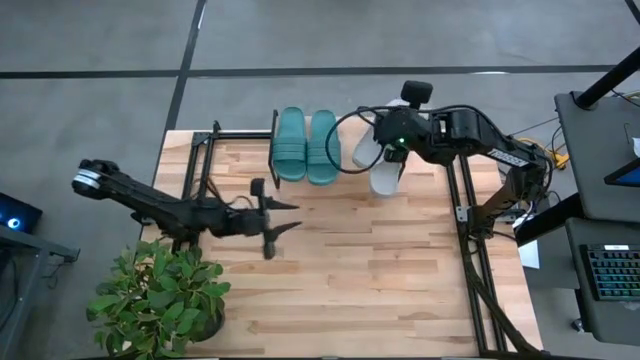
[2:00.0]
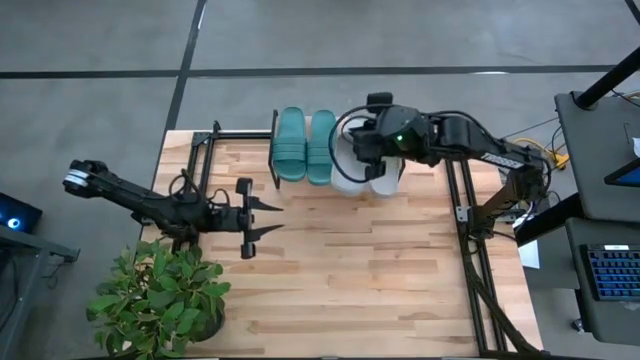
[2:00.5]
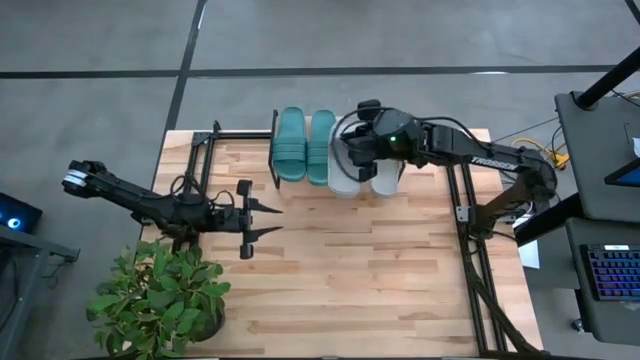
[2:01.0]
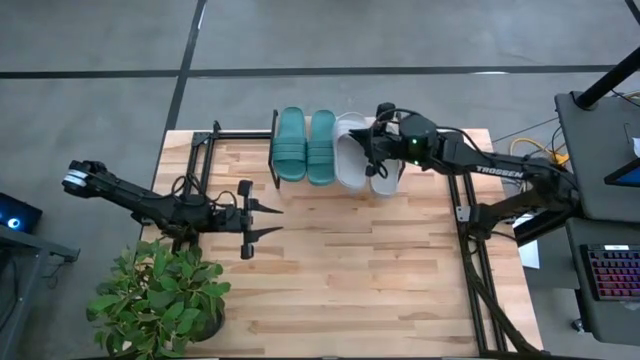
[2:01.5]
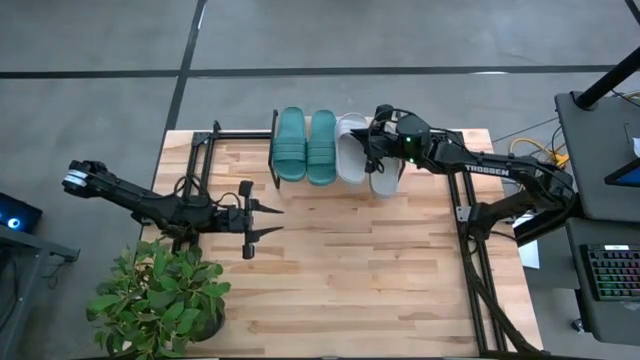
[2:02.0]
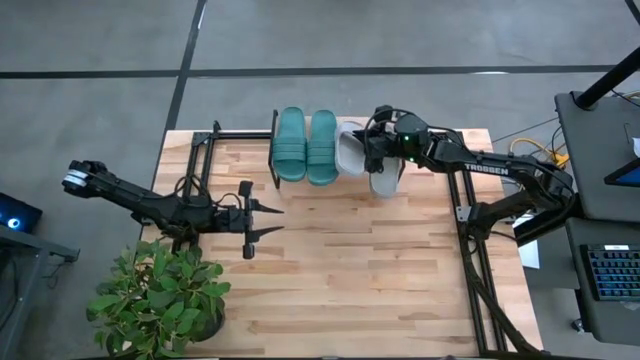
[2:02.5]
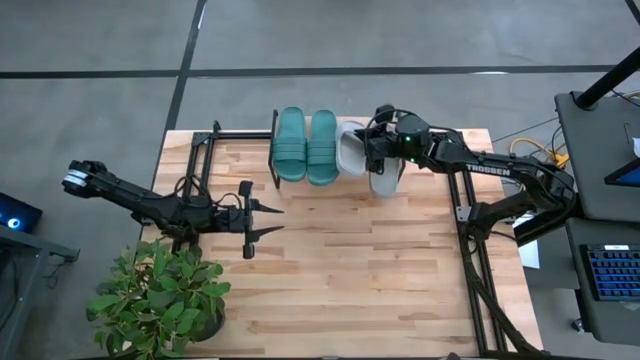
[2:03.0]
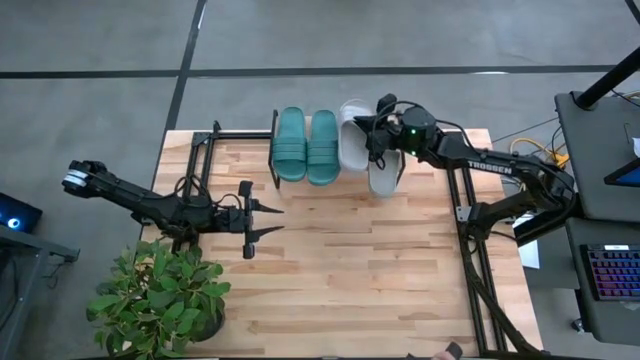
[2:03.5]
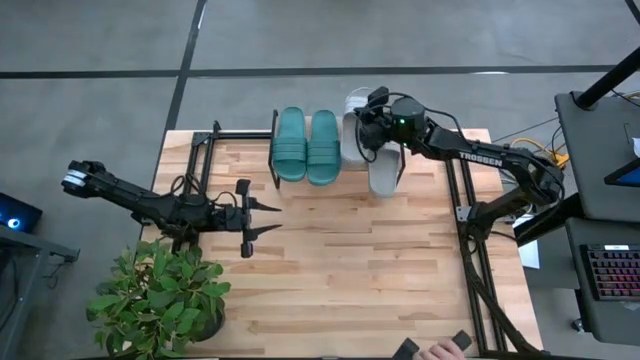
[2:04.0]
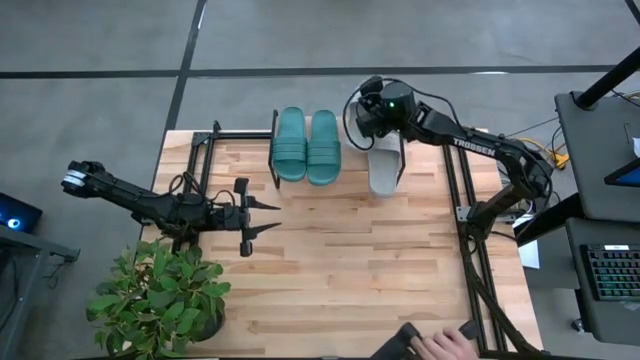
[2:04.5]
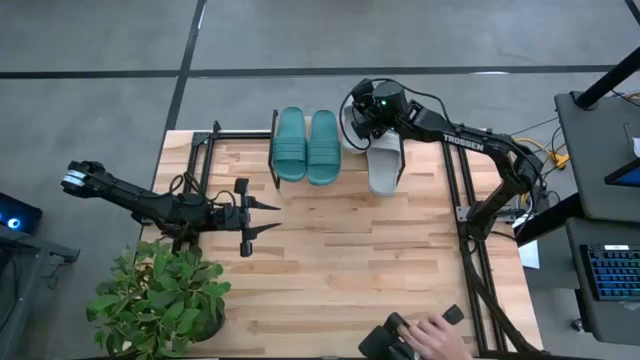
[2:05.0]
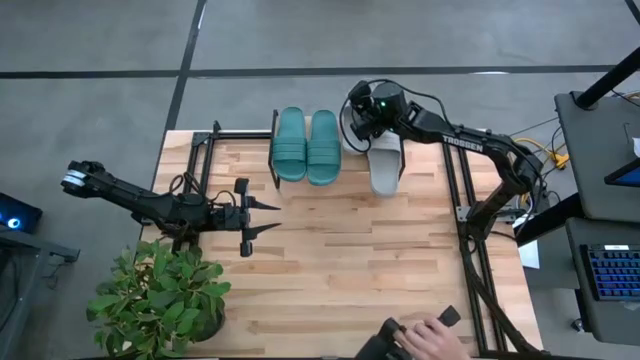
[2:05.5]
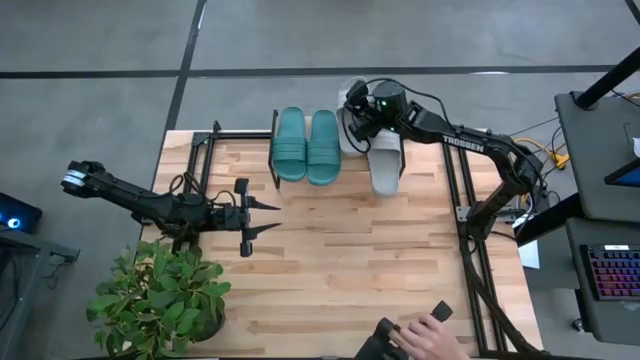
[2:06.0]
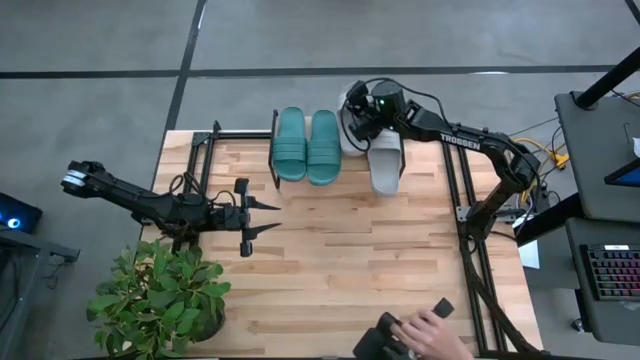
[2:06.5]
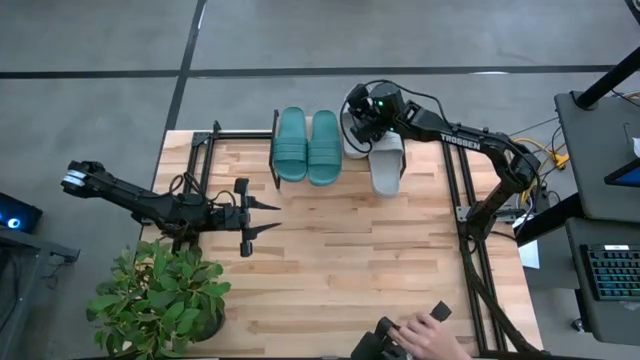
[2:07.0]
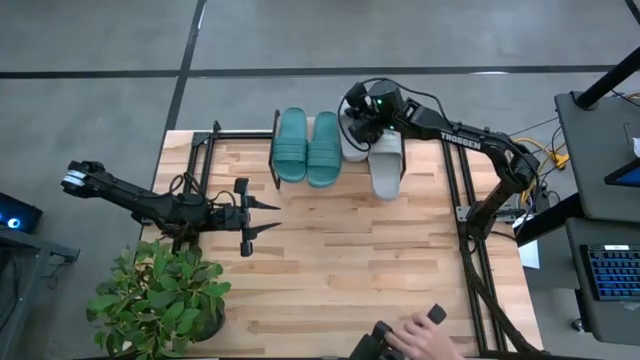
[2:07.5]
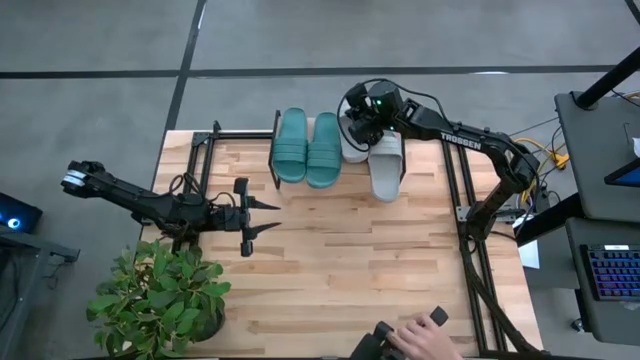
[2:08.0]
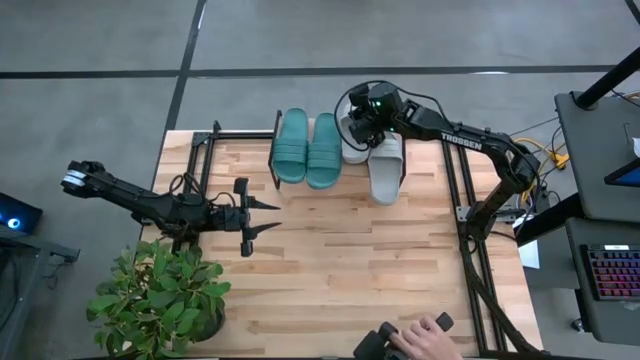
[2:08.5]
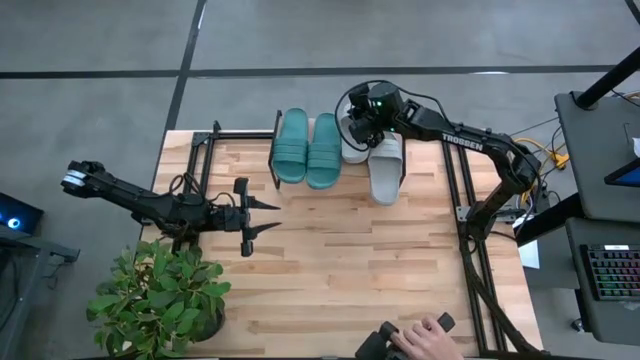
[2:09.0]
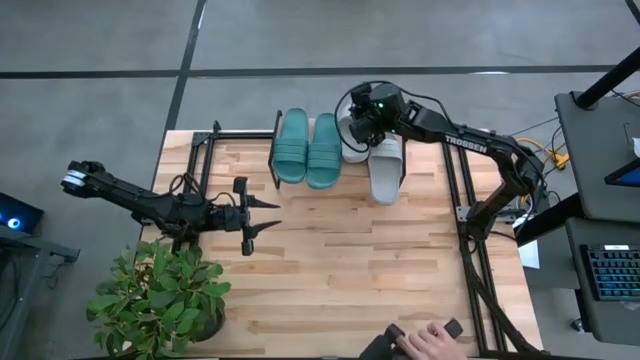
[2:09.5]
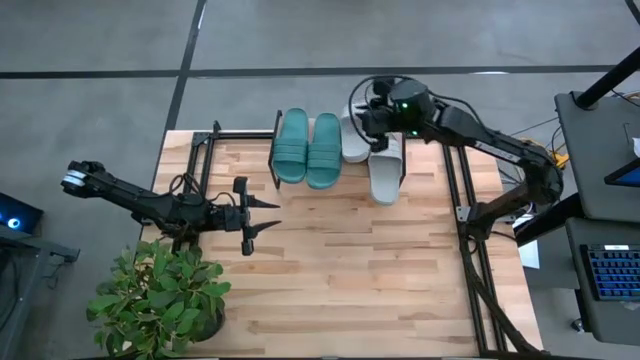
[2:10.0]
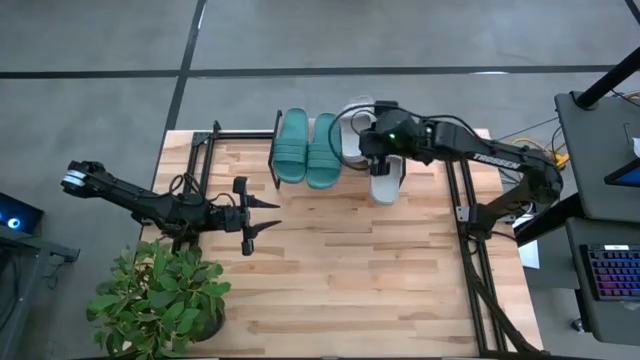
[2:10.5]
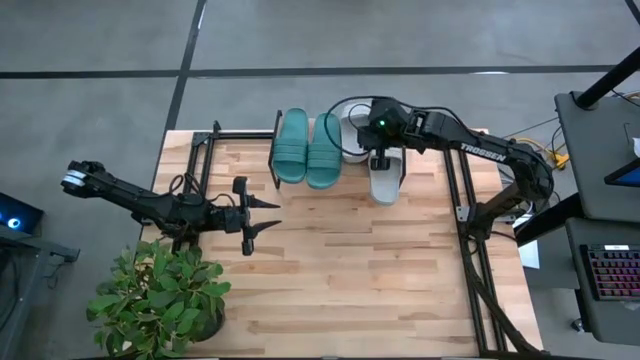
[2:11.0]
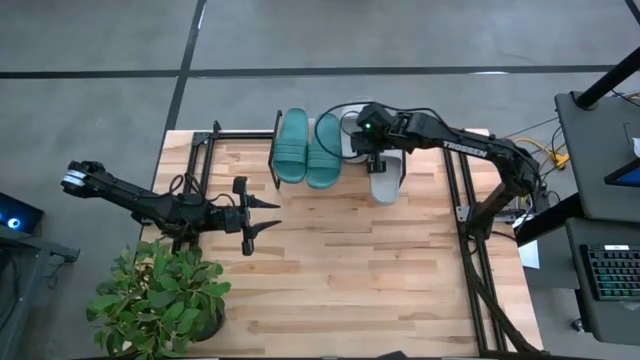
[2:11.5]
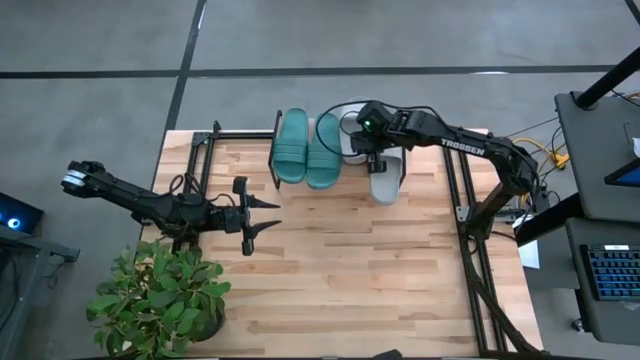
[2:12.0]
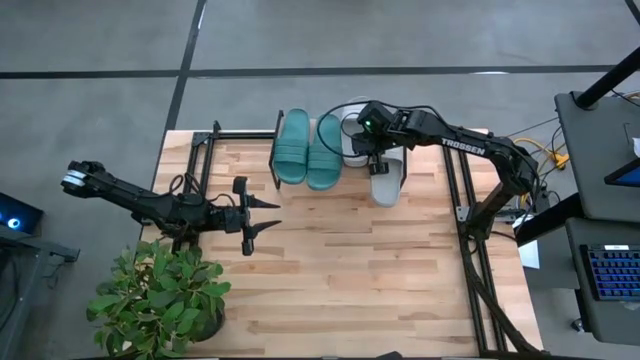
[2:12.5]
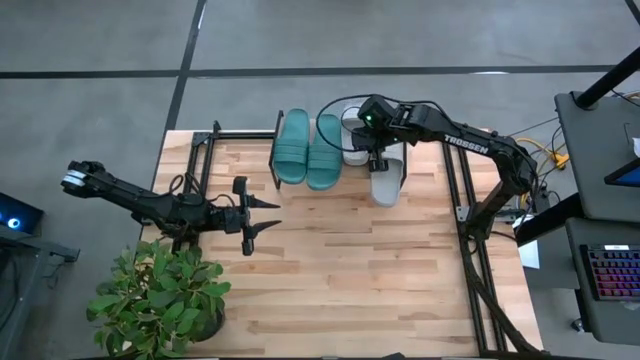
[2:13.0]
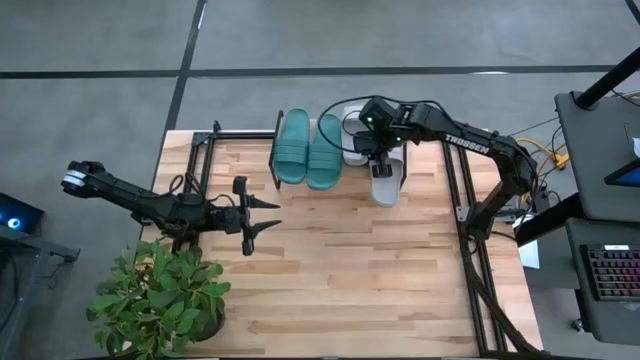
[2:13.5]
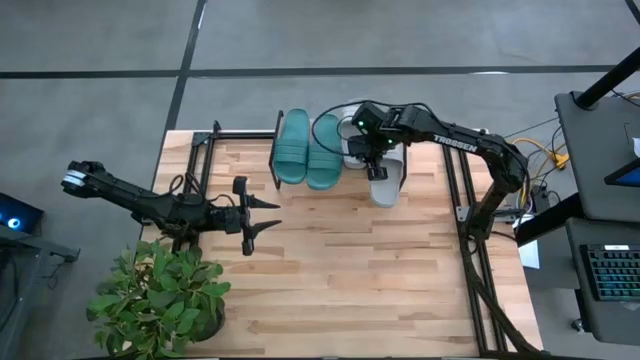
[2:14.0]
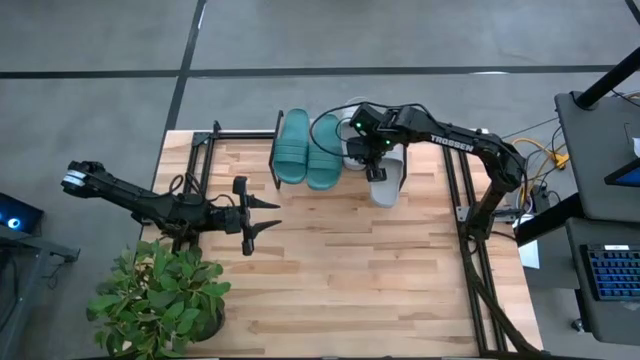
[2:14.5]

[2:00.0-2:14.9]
Task: Pick and place slides into the shelf
Put the gray slide on the shelf next to the other gray slide

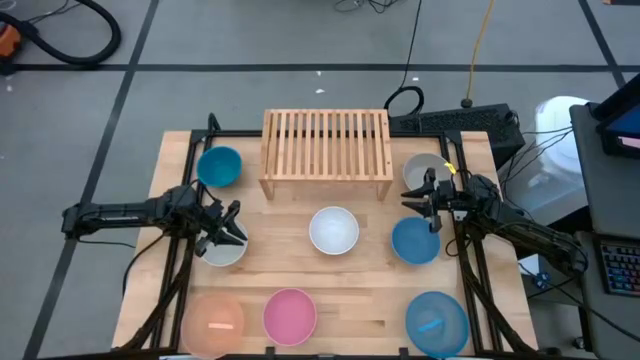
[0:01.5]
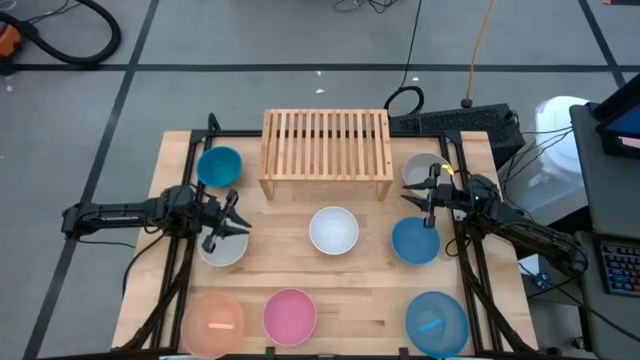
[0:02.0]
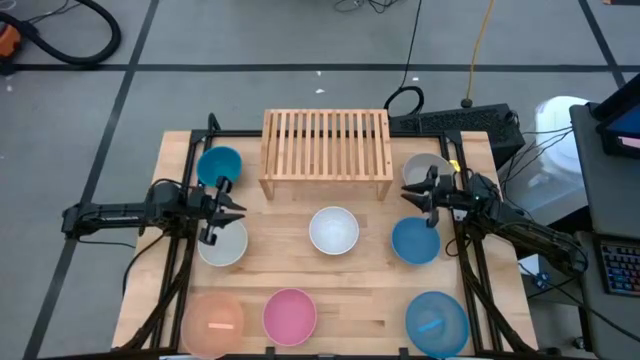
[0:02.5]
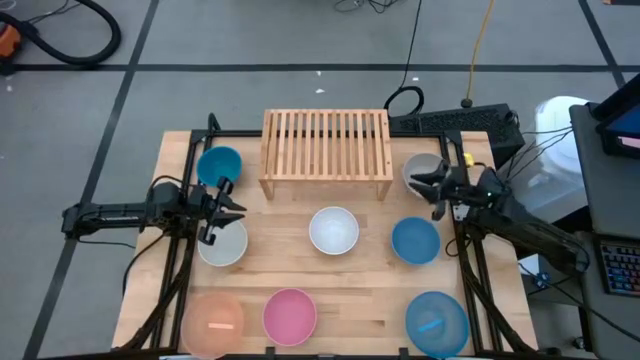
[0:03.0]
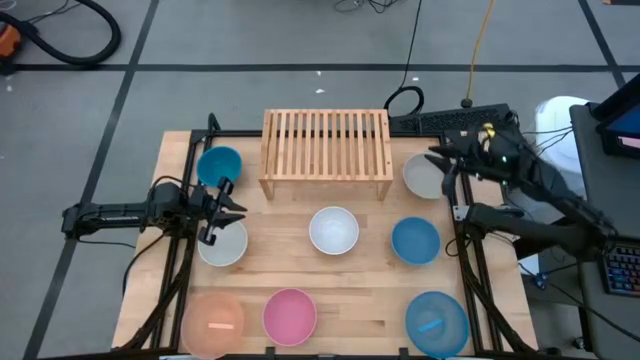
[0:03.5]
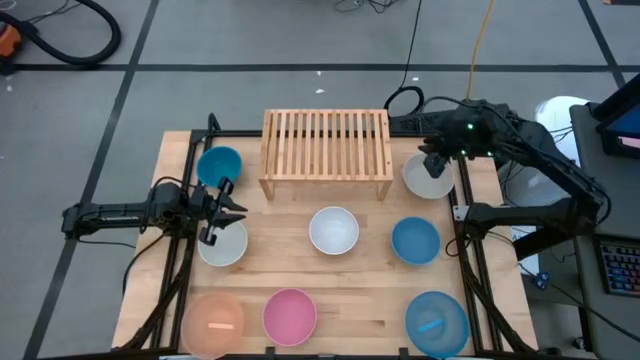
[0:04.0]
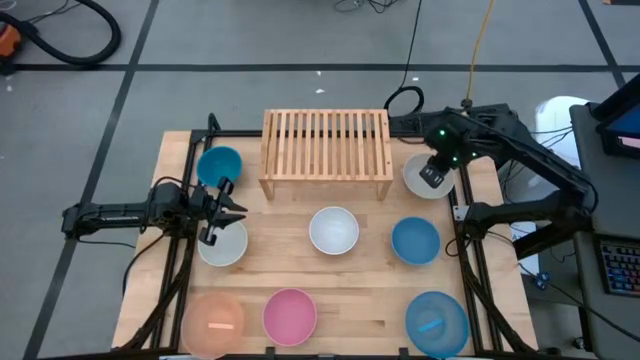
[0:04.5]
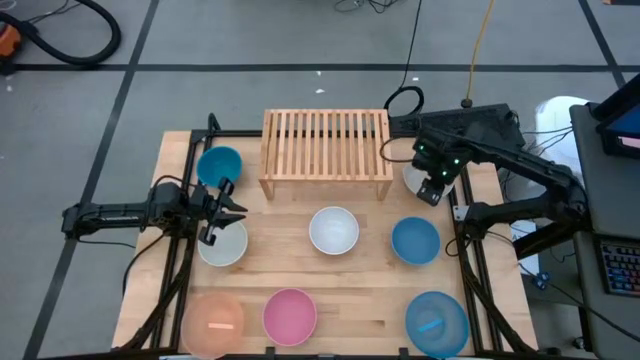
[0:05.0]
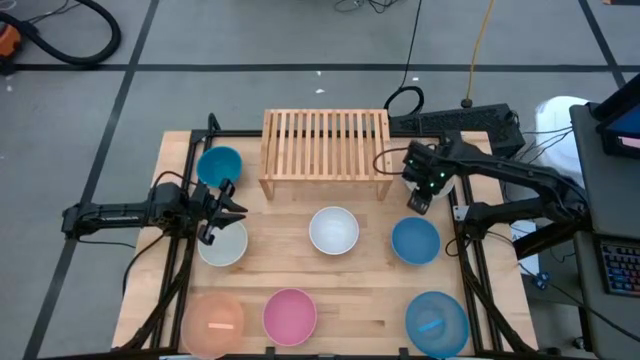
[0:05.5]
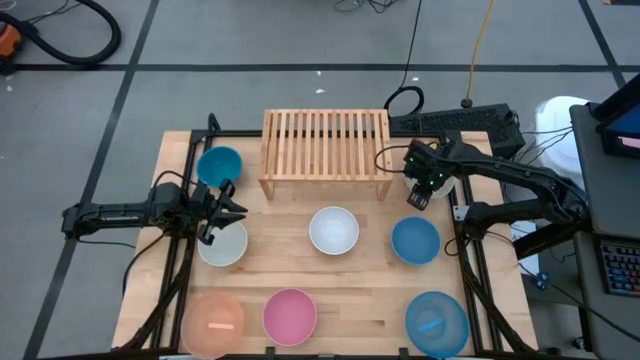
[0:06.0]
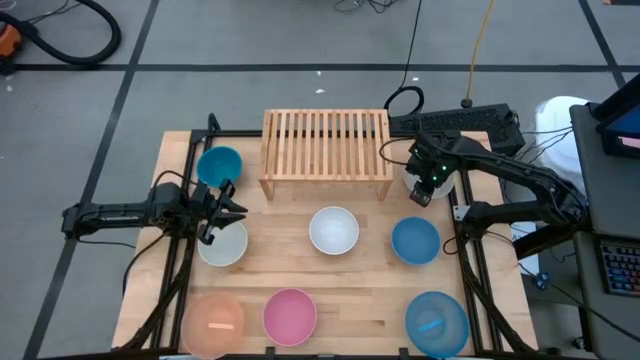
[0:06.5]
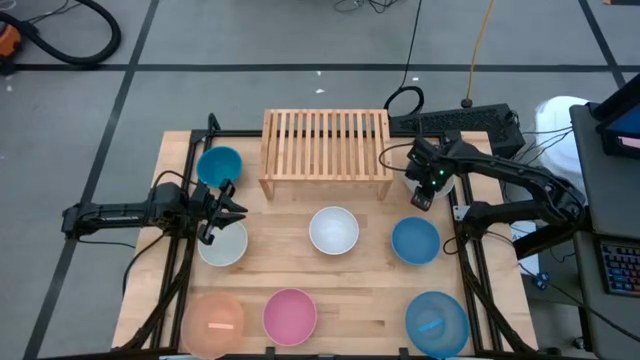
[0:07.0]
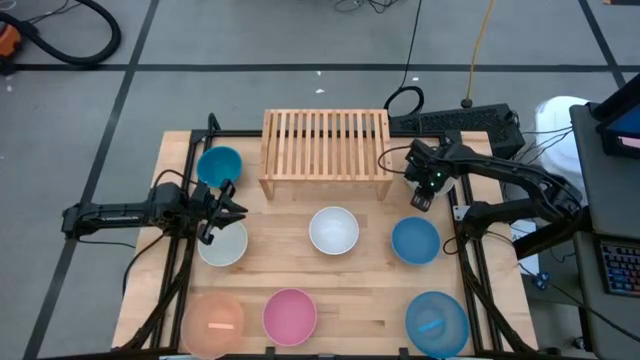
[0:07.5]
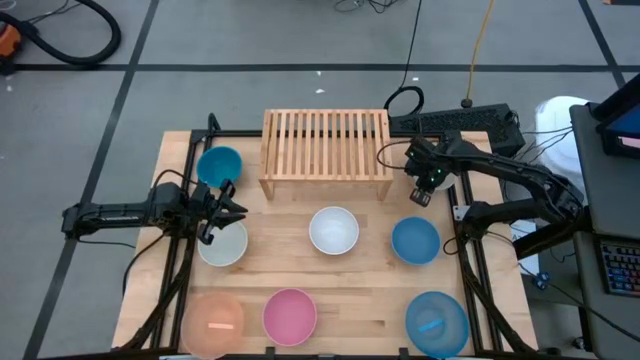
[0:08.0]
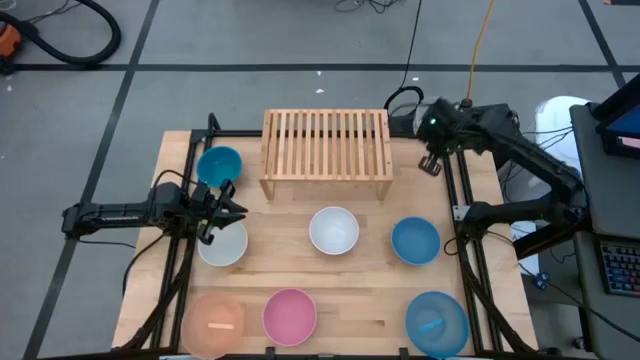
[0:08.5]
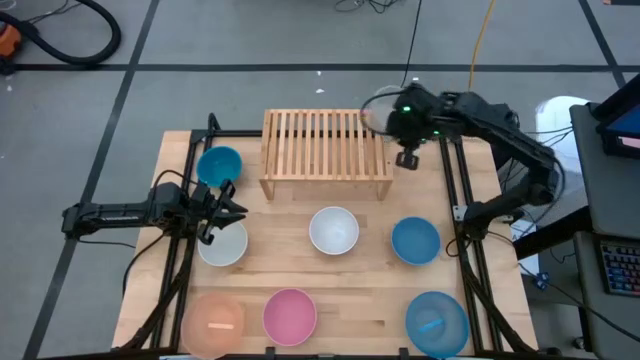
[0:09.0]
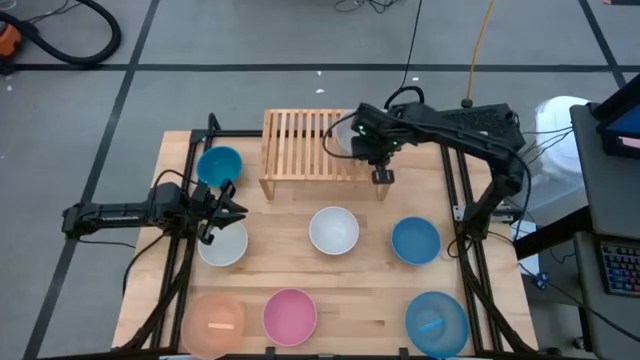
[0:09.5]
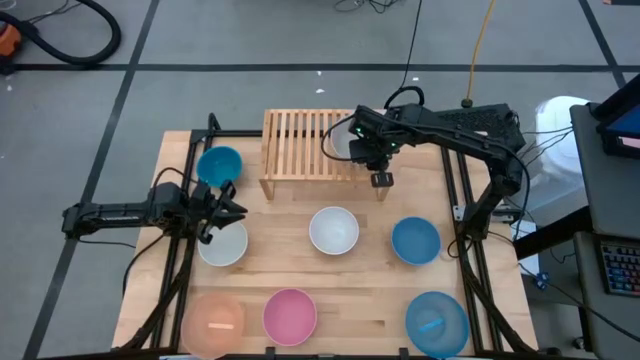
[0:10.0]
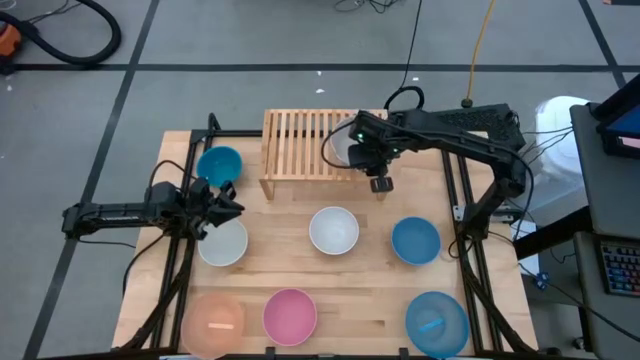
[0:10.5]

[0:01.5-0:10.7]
Task: Place and stack bowls onto a shelf
Put the large gray bowl on the shelf
